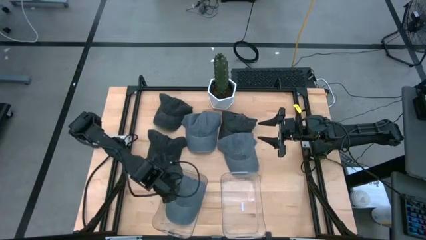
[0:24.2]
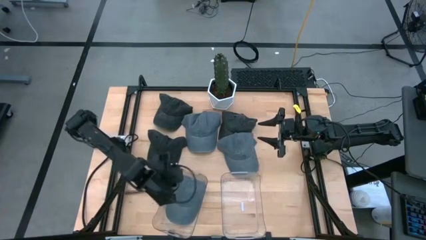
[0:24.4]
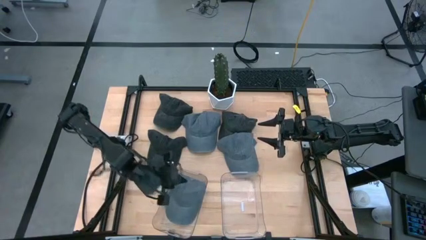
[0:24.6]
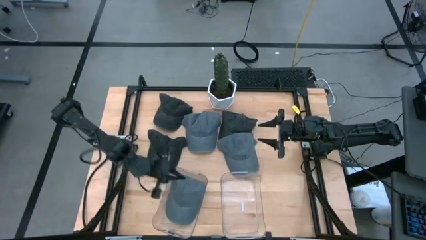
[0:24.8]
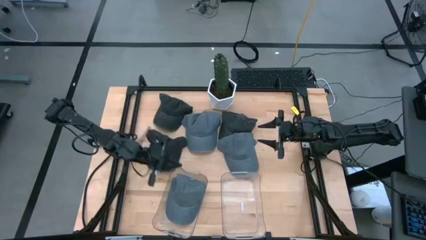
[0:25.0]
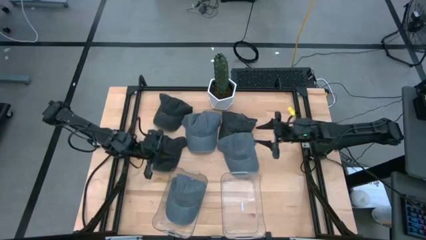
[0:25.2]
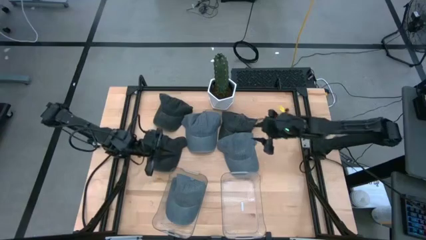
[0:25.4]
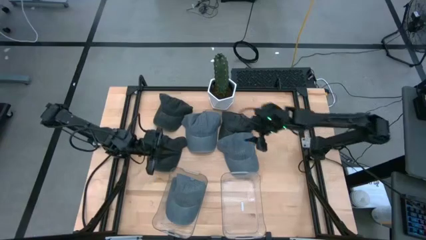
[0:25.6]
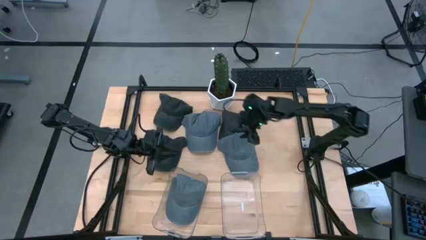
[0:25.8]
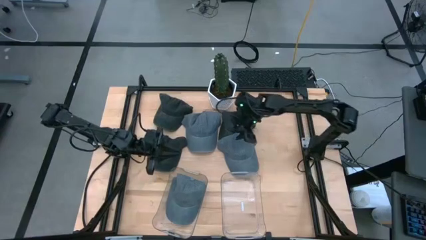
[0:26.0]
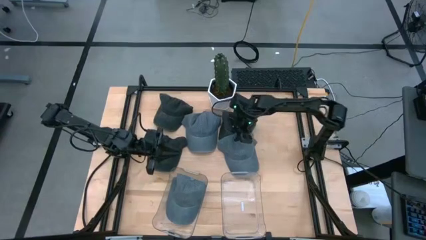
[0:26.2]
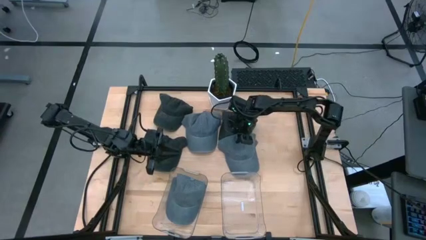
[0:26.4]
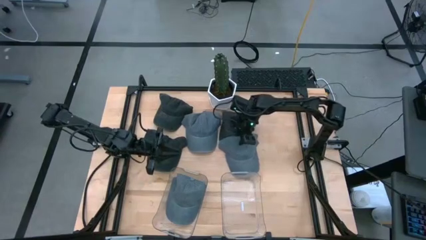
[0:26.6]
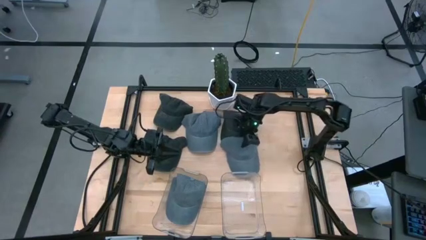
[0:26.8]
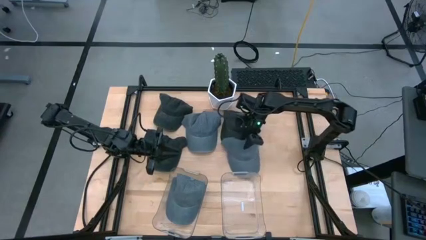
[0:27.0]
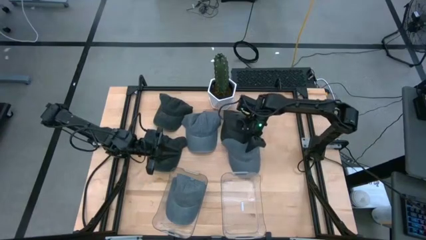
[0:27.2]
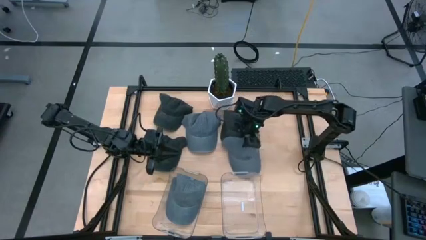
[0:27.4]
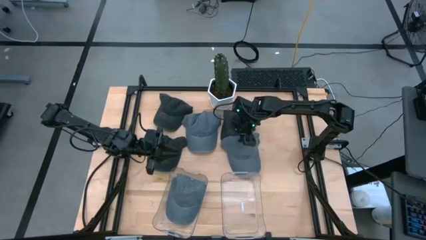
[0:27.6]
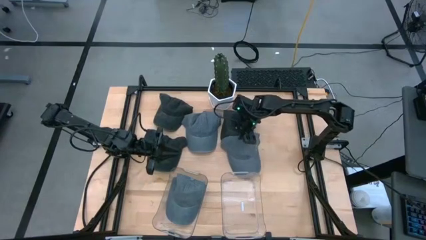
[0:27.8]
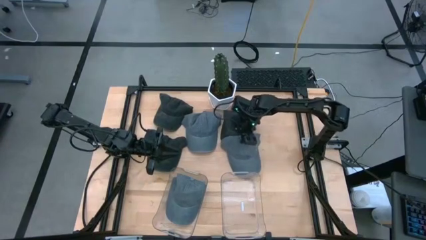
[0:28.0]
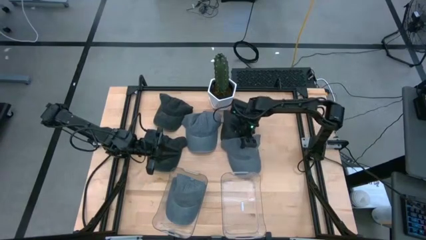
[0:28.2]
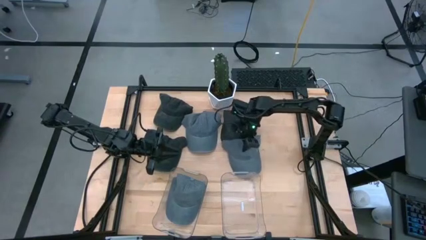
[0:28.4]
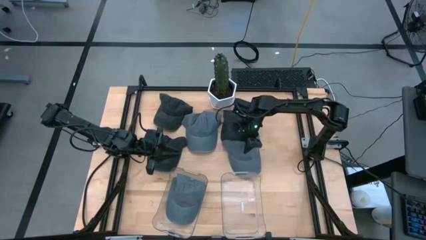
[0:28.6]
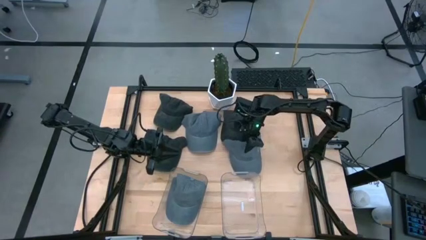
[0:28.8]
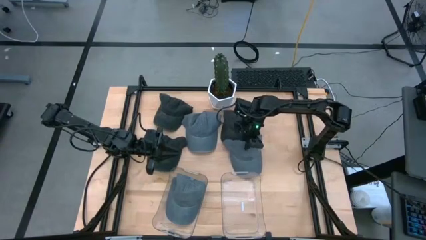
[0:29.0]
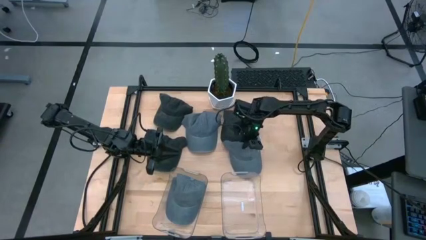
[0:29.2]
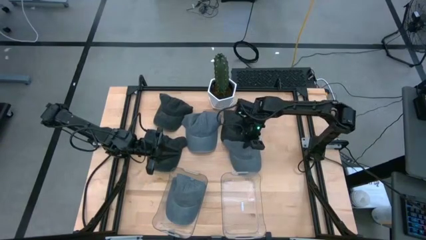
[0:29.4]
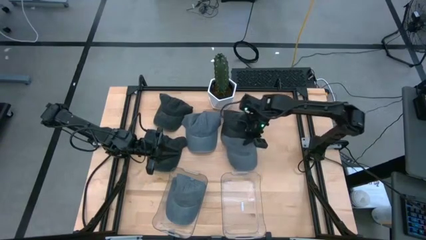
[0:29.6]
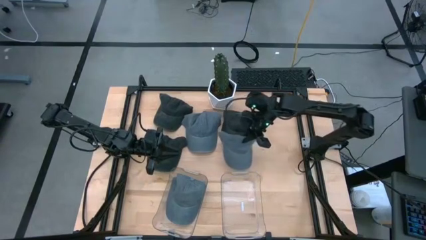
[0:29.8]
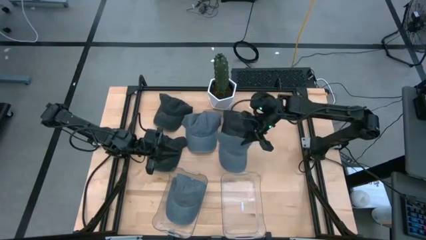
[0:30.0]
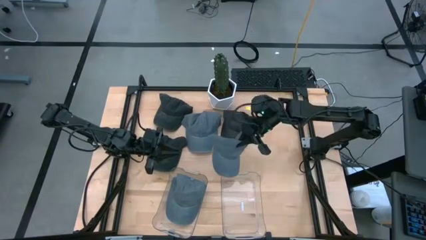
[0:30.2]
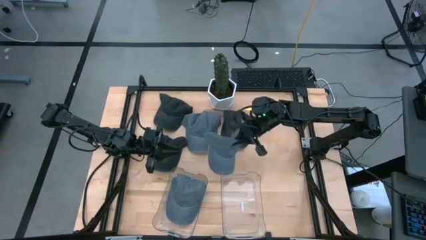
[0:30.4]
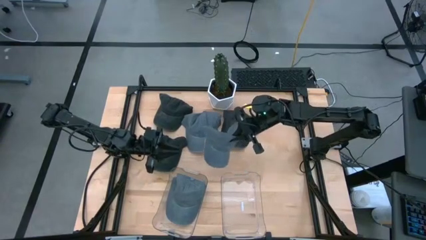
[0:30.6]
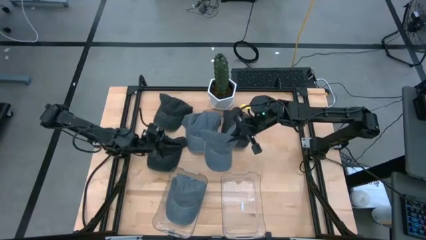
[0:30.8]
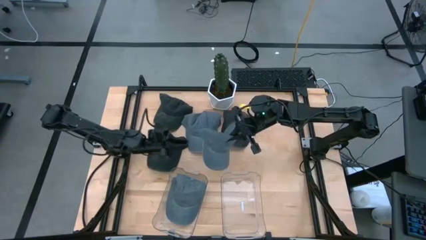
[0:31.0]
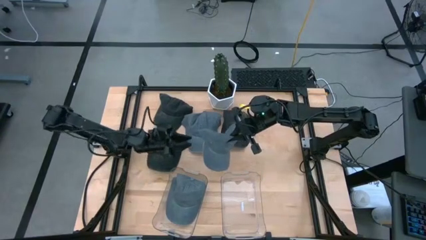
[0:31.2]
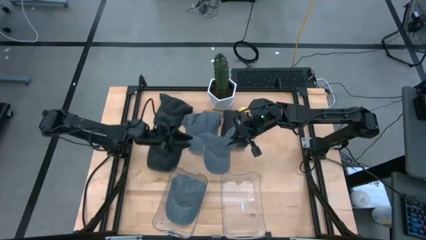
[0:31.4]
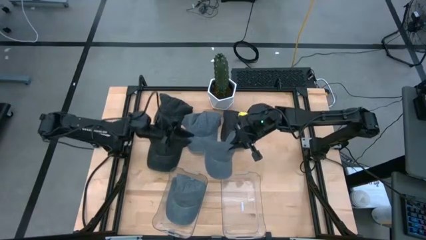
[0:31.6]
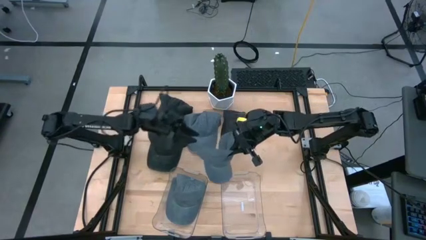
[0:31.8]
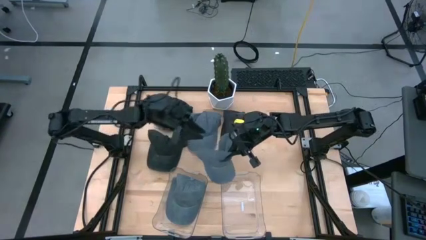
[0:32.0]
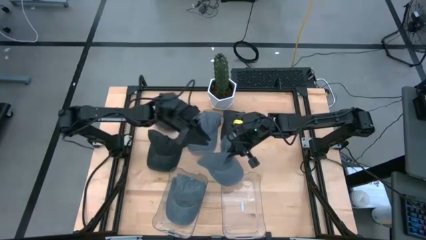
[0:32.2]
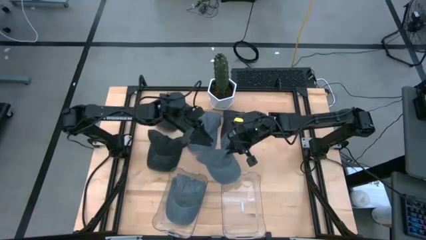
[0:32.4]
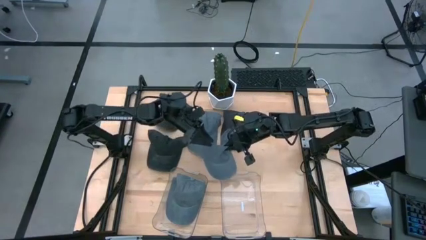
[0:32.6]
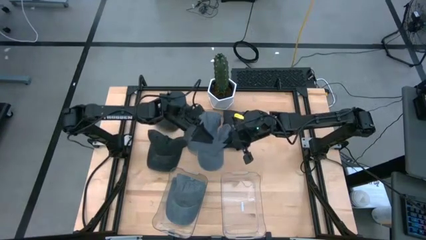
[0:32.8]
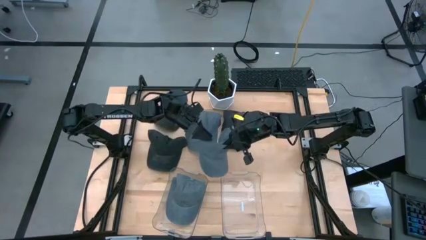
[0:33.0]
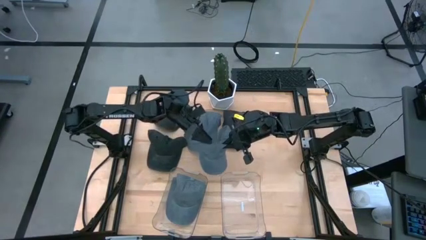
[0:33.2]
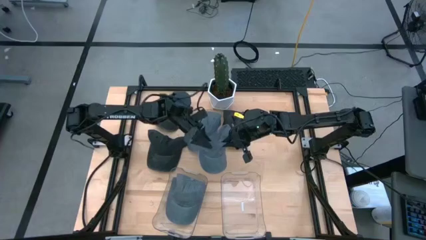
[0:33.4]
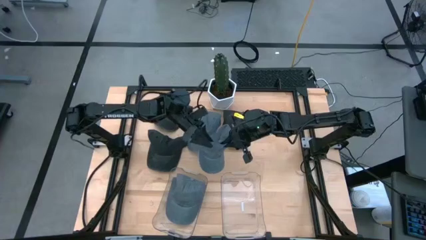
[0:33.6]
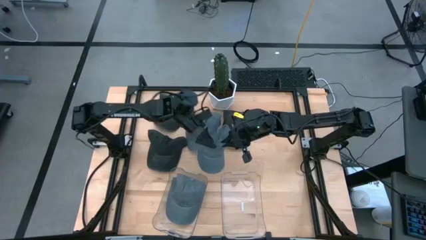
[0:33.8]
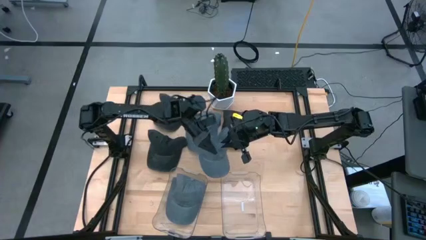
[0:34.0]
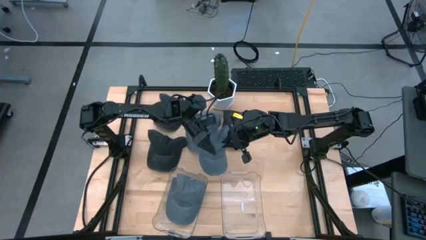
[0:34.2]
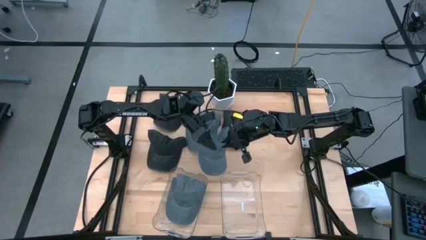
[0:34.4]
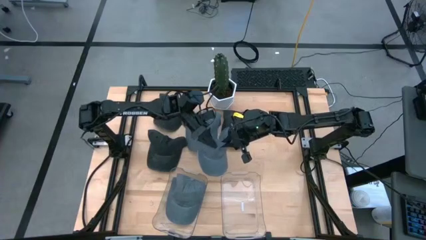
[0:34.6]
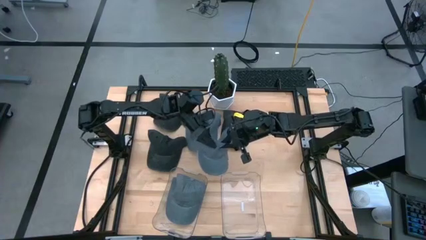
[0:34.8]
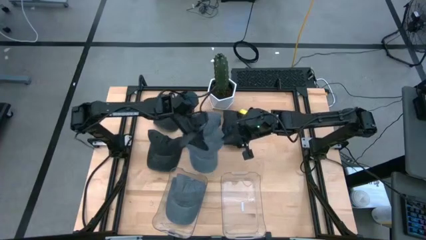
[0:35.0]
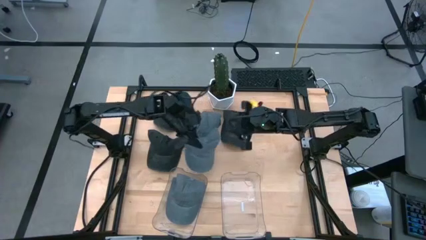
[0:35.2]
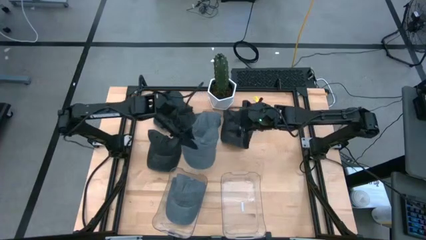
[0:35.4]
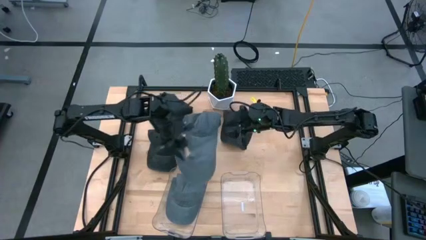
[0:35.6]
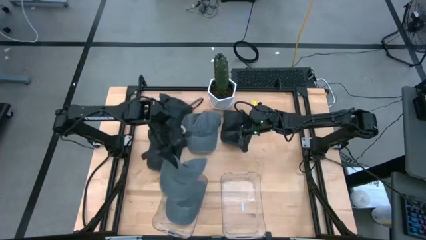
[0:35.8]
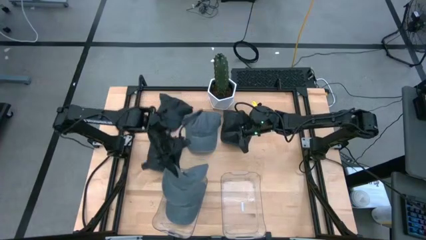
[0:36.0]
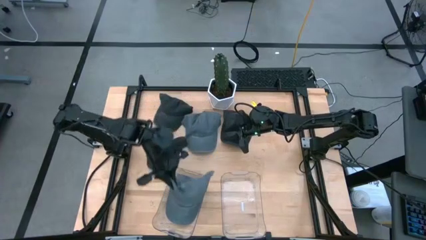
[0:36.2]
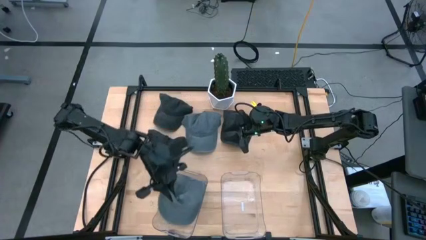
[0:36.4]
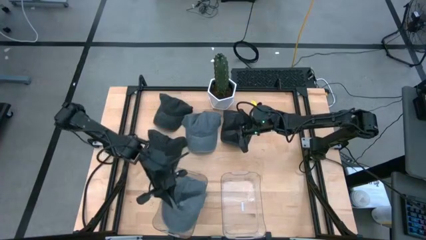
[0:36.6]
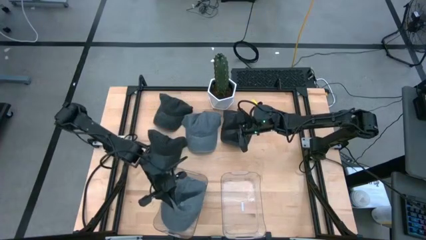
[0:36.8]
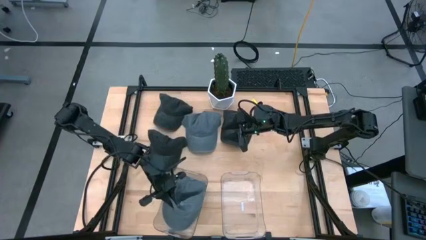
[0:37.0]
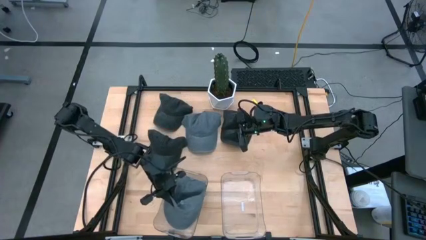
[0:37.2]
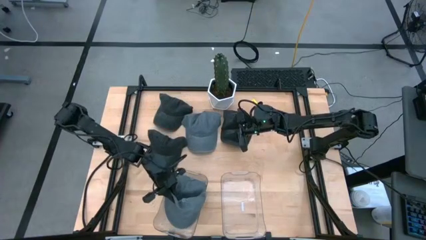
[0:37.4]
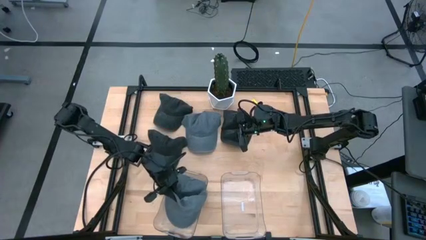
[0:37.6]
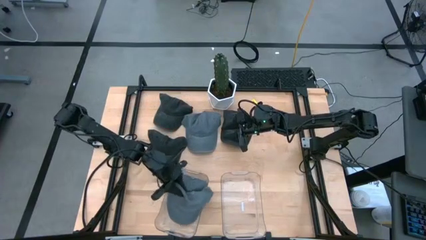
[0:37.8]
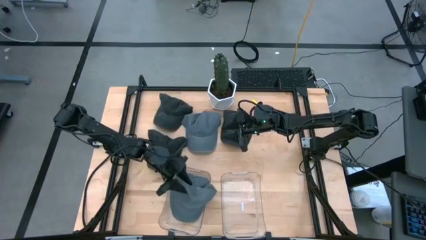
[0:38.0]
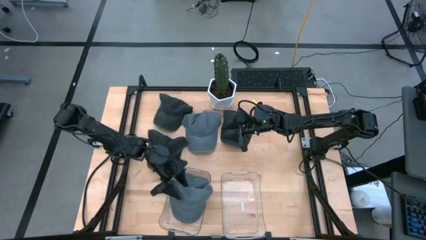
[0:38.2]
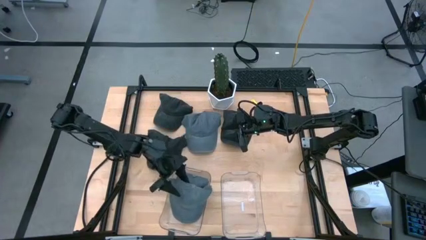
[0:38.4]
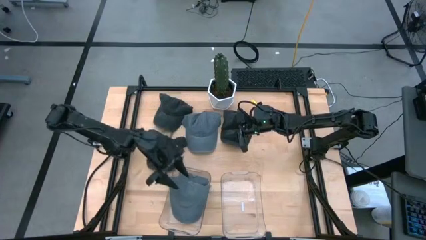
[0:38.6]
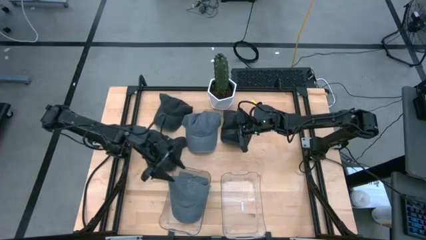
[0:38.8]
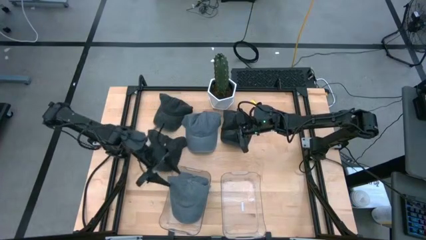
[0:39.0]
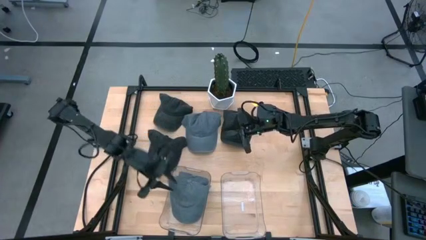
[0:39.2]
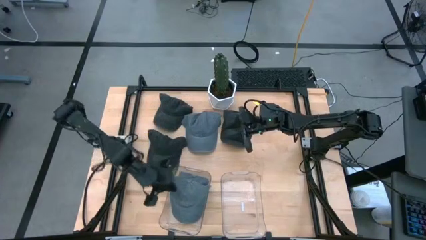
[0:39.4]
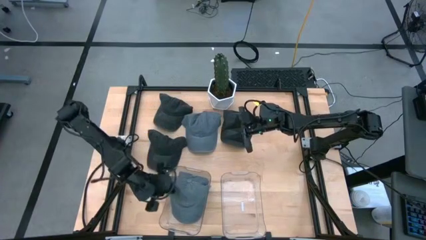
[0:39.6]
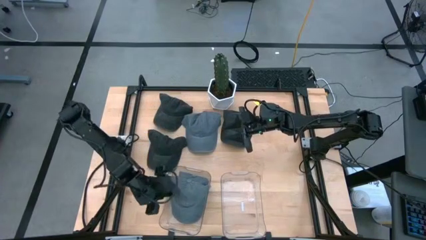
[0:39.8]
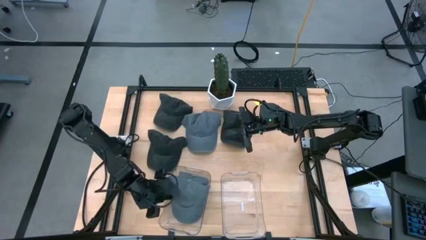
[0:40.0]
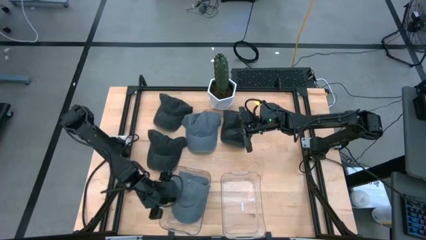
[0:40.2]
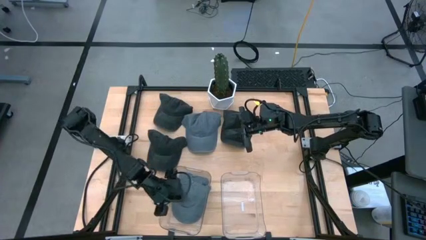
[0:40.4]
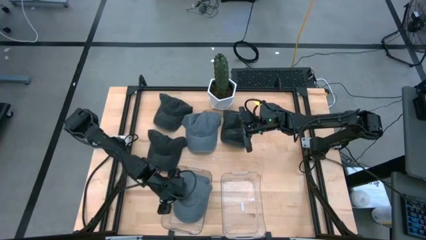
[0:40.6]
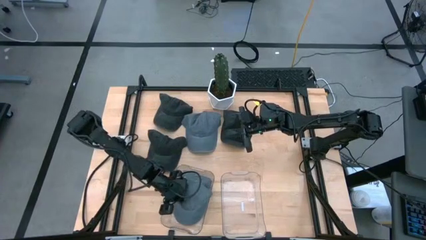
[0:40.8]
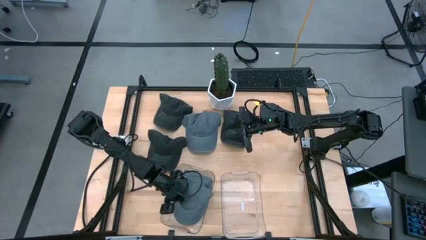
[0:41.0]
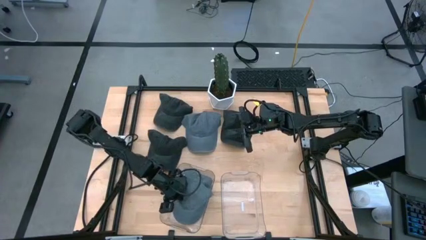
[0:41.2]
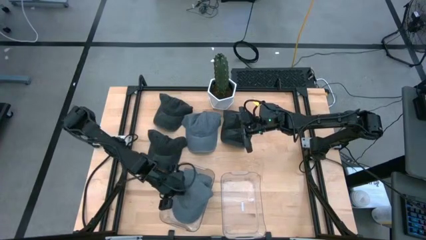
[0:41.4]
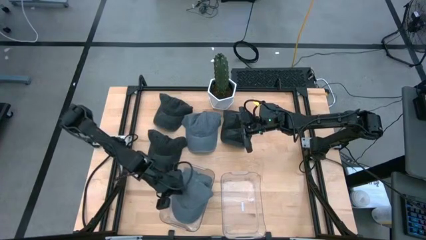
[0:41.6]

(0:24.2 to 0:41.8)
Task: Pick & Place hat
Put the bottom gray cap into the left transparent bin
